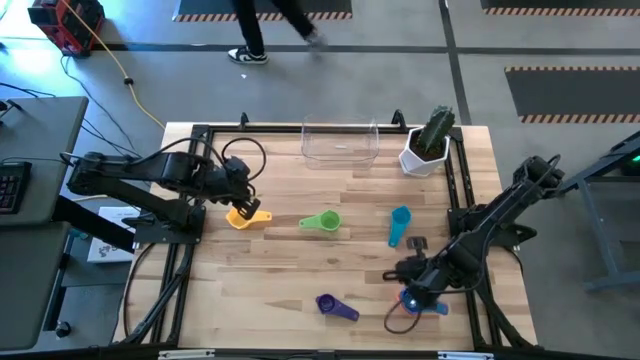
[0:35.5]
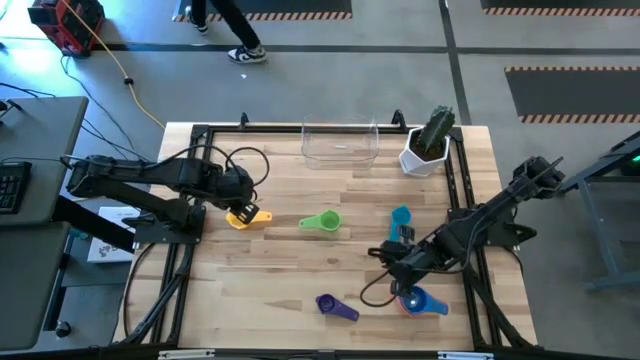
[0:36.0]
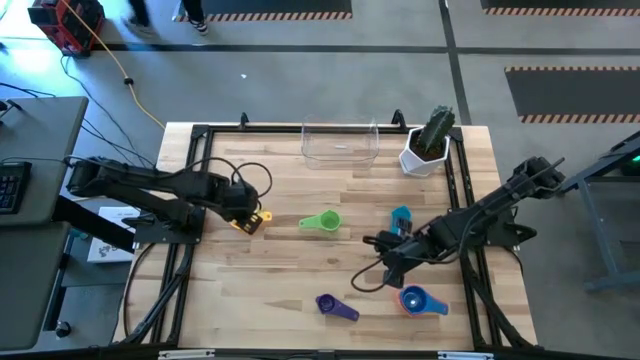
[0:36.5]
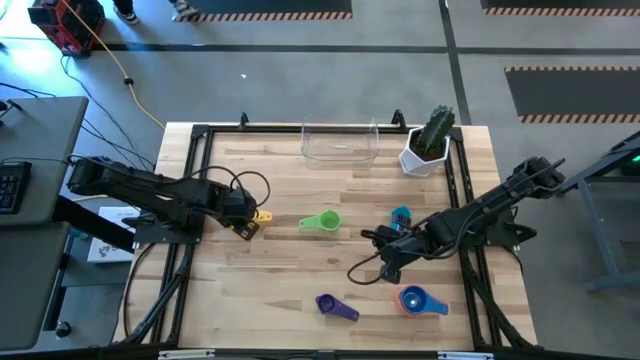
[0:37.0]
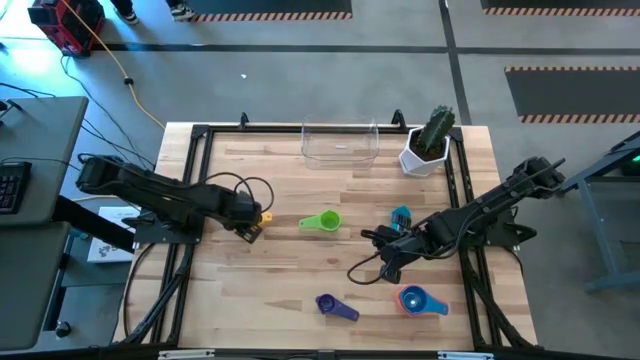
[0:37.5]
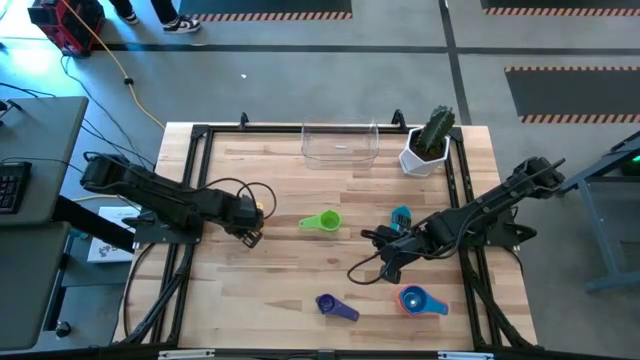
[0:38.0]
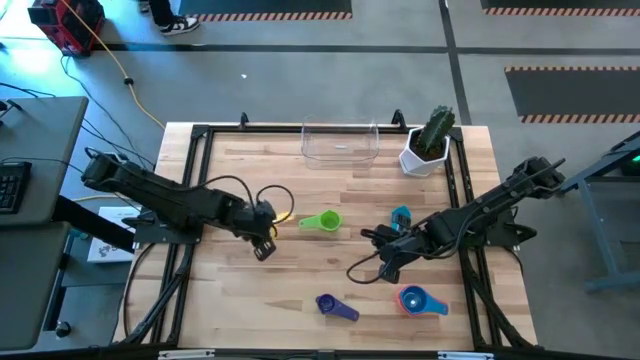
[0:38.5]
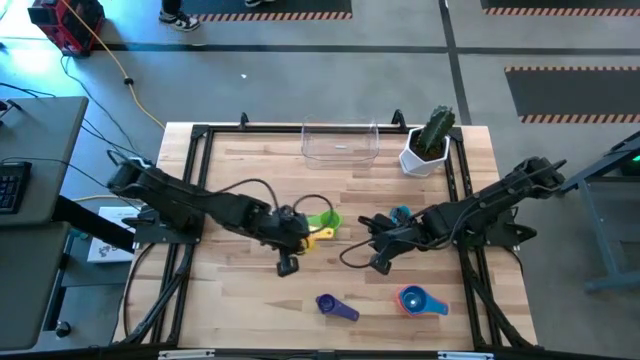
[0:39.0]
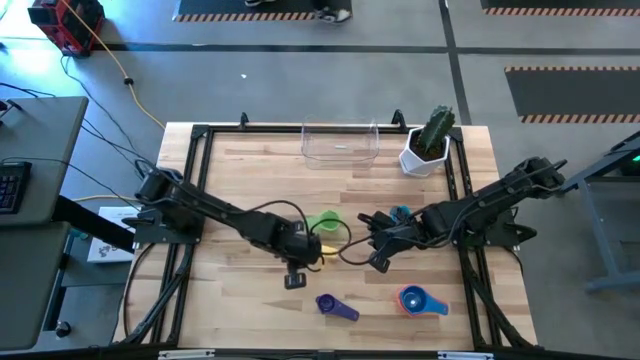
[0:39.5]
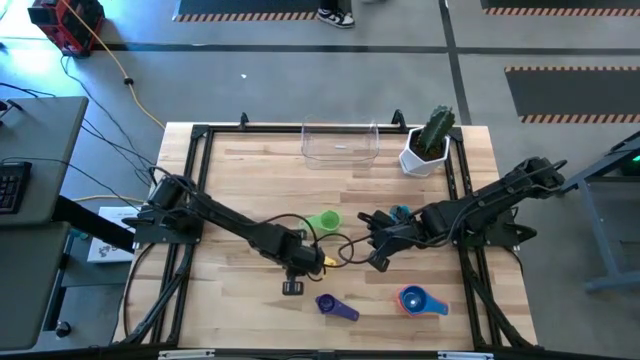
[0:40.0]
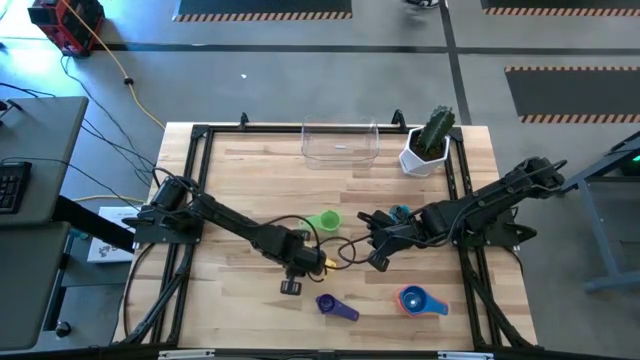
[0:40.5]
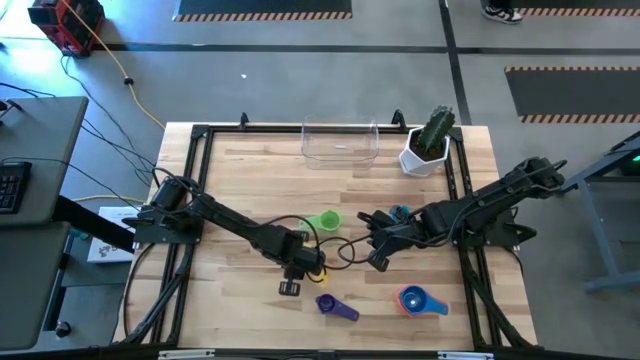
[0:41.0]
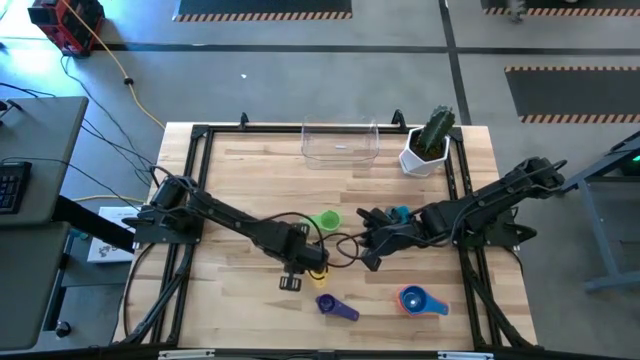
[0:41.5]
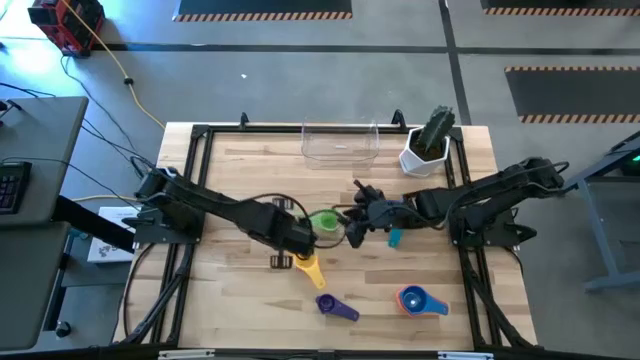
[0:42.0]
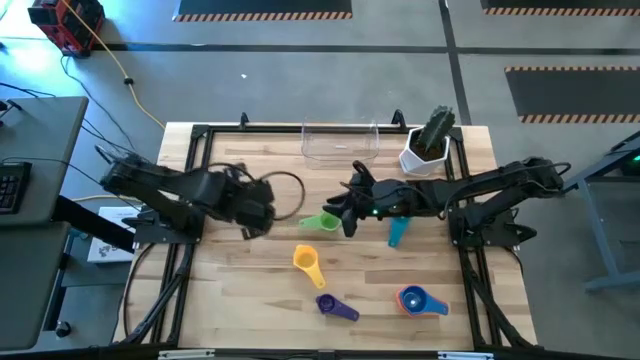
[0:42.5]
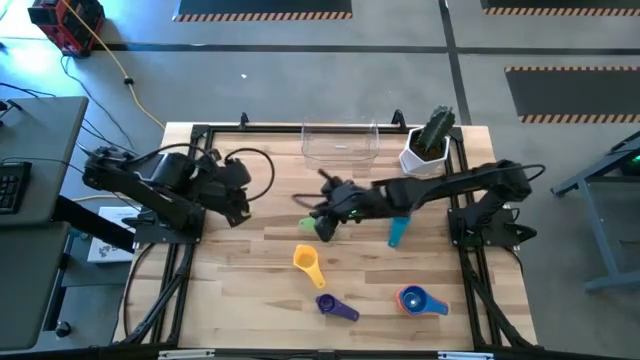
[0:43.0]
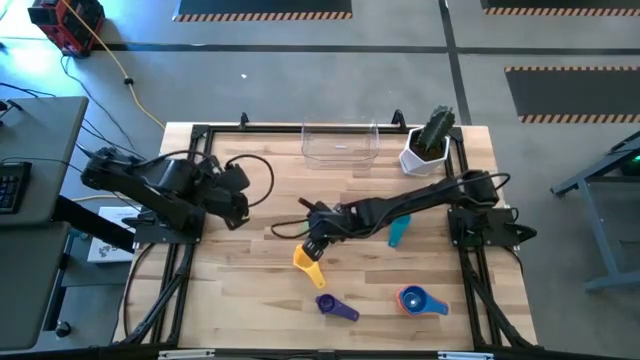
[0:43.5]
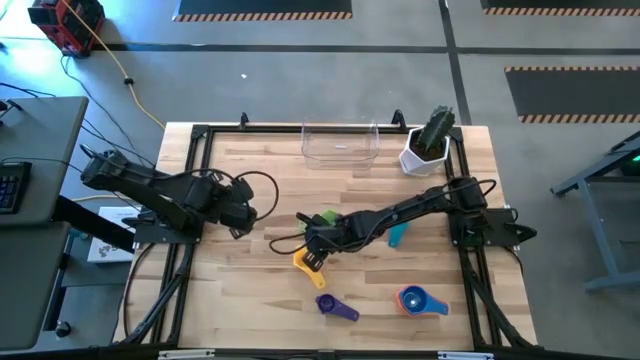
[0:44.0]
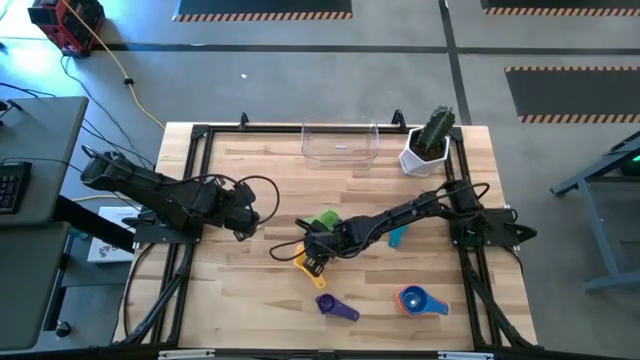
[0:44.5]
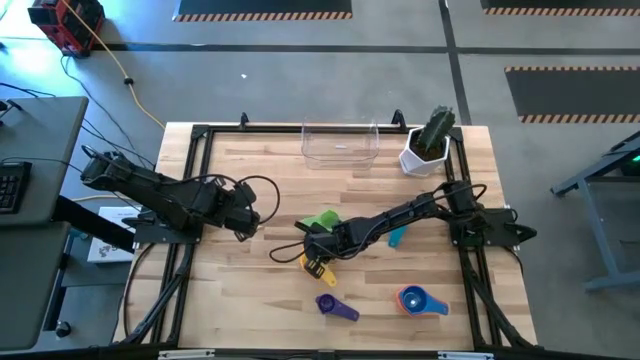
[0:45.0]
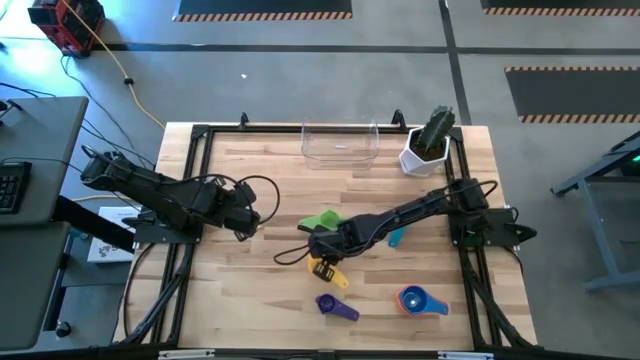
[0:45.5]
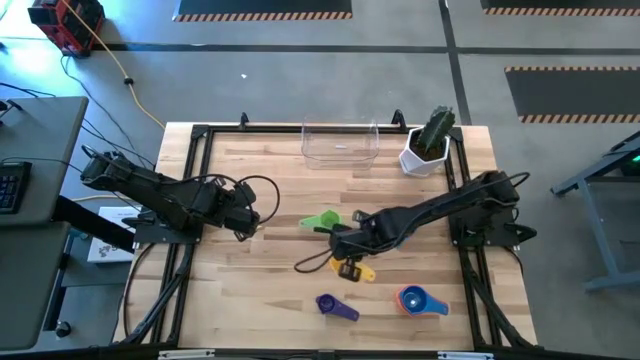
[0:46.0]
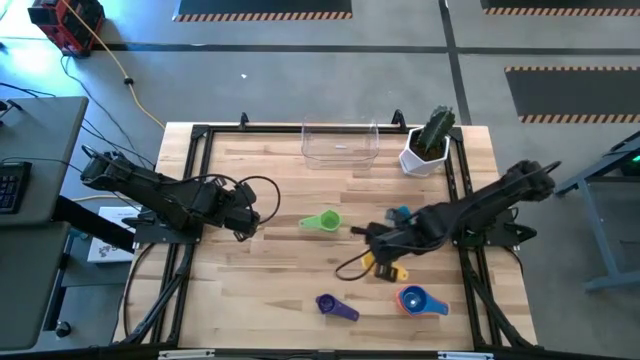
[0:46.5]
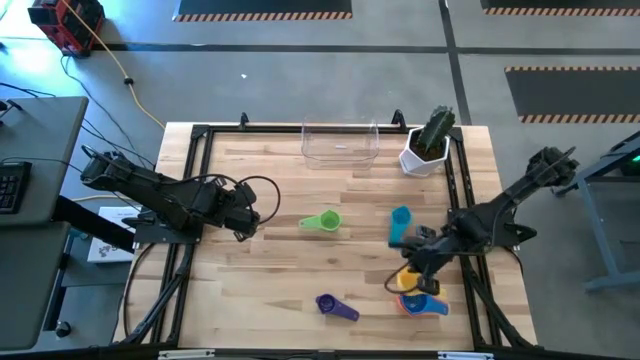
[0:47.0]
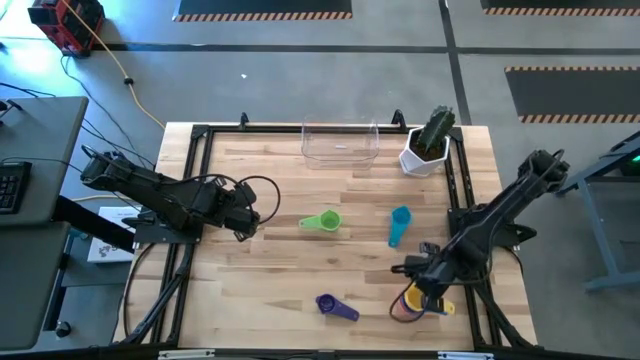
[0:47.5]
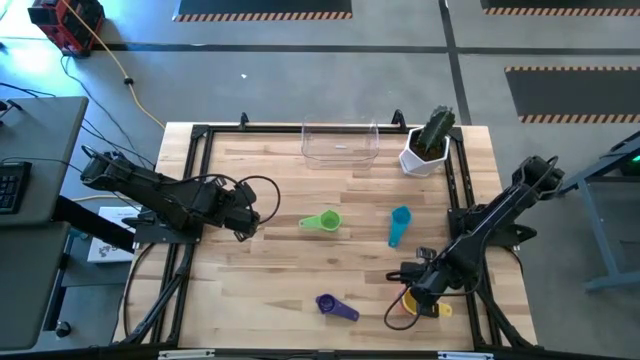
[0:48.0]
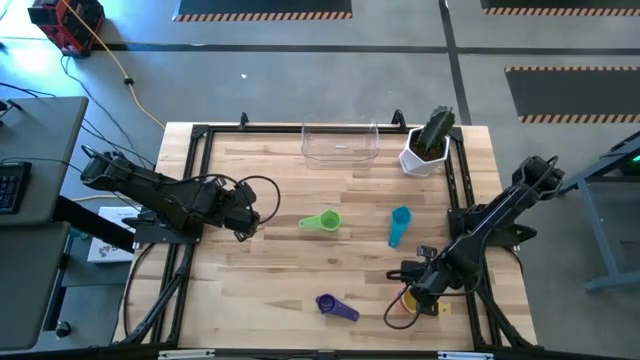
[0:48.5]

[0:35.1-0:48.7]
Task: Nest measuring cups in basket
Stack the yellow measuring cup on the top of the blue measuring cup

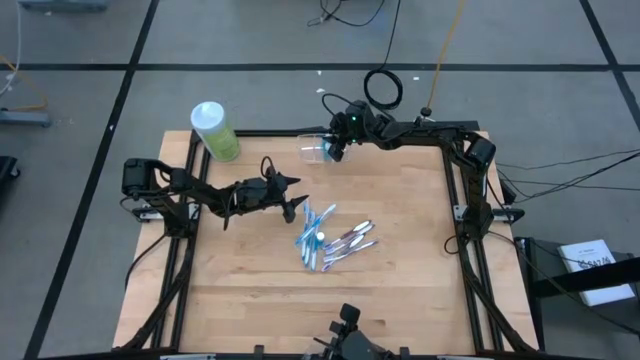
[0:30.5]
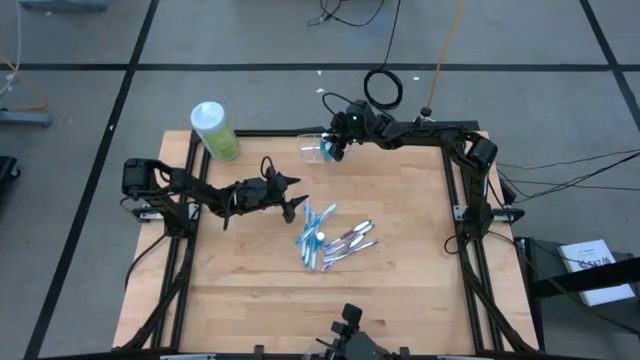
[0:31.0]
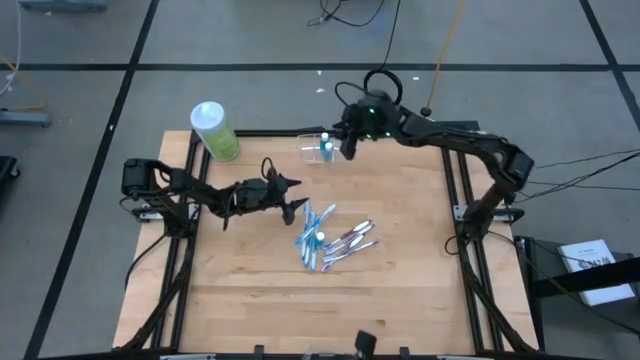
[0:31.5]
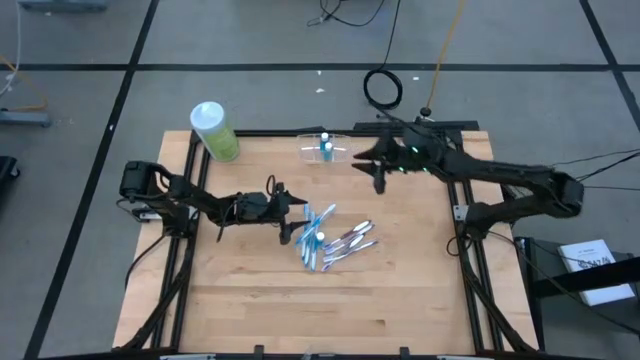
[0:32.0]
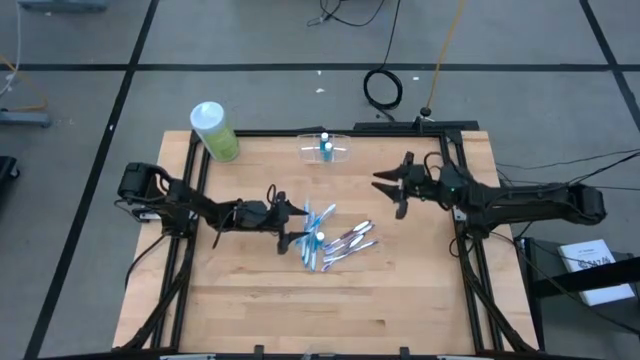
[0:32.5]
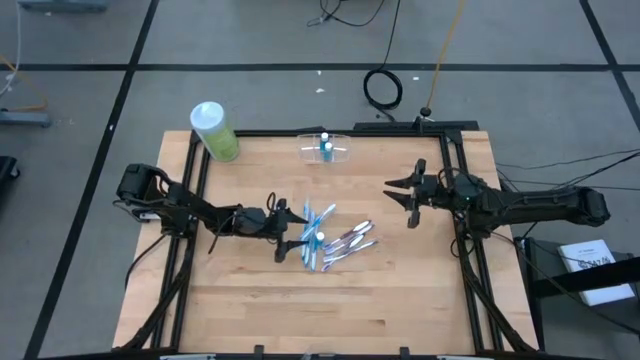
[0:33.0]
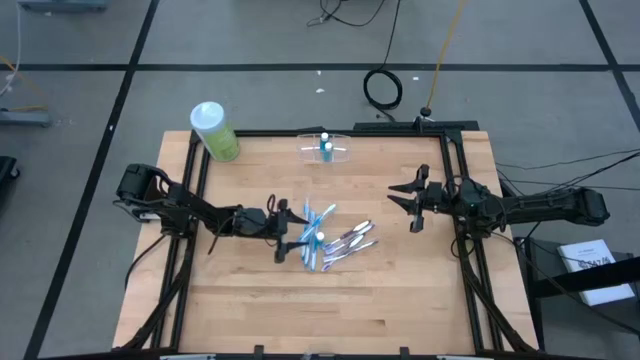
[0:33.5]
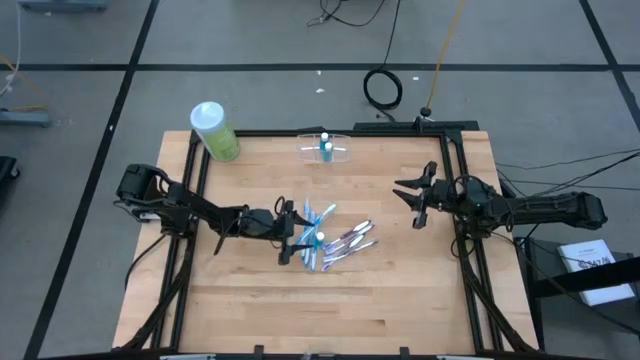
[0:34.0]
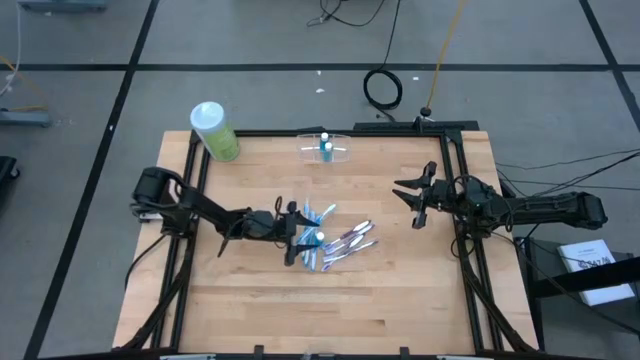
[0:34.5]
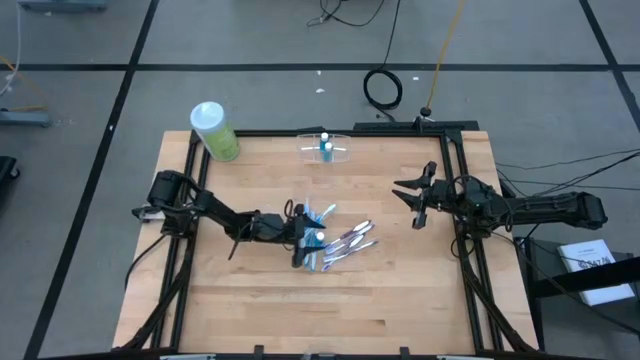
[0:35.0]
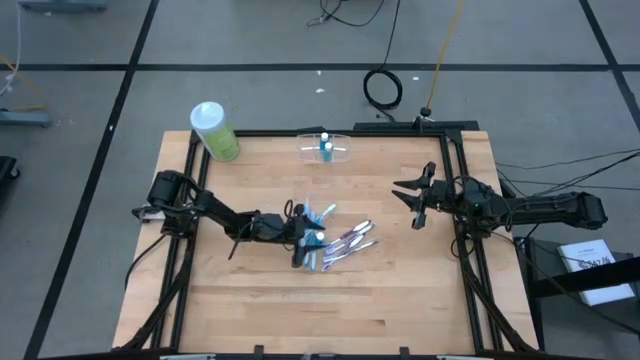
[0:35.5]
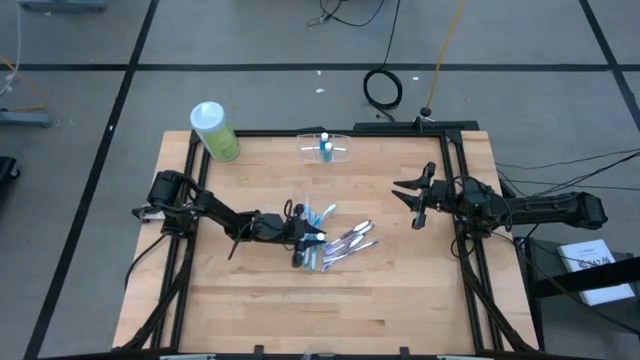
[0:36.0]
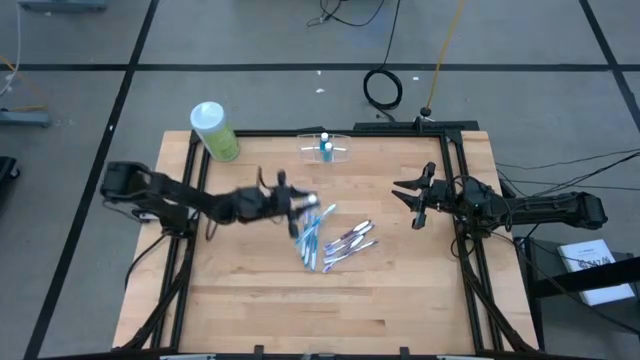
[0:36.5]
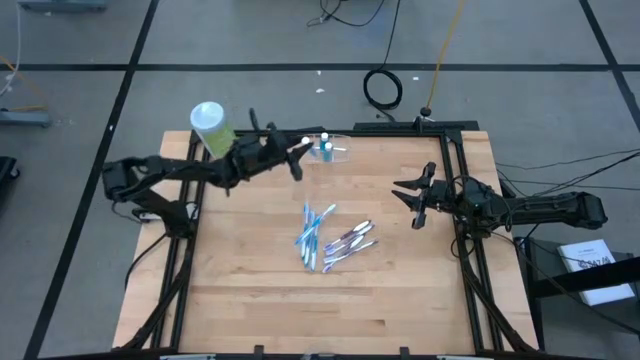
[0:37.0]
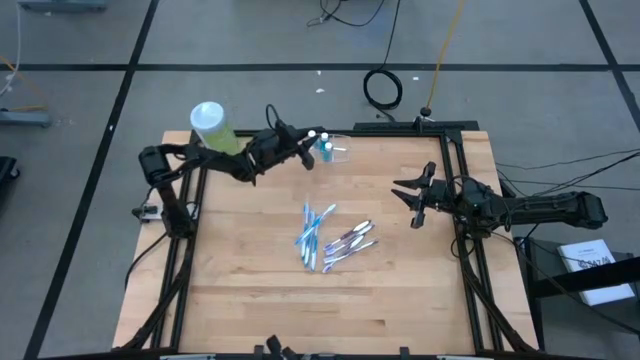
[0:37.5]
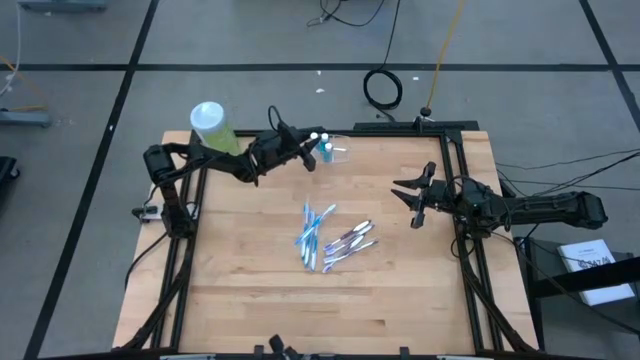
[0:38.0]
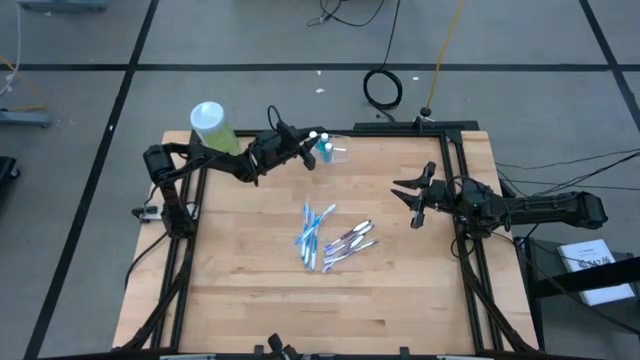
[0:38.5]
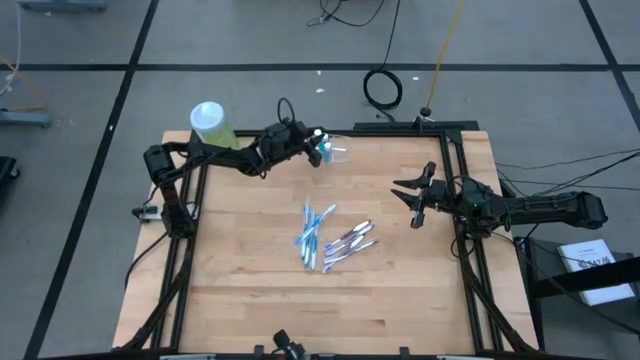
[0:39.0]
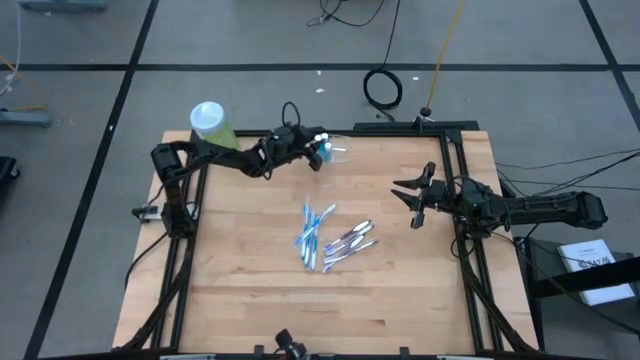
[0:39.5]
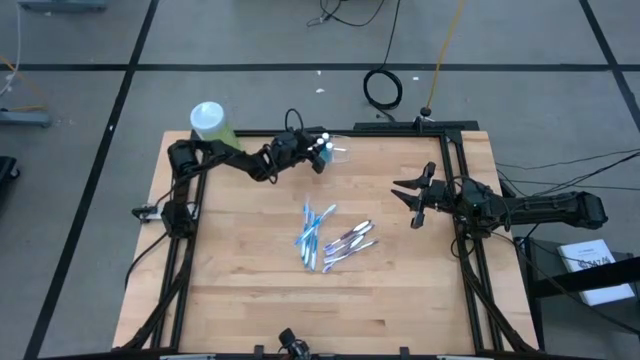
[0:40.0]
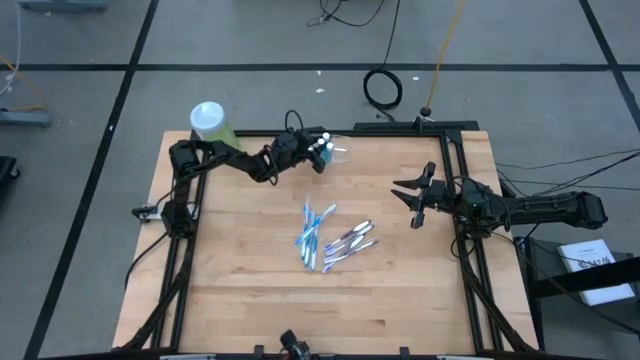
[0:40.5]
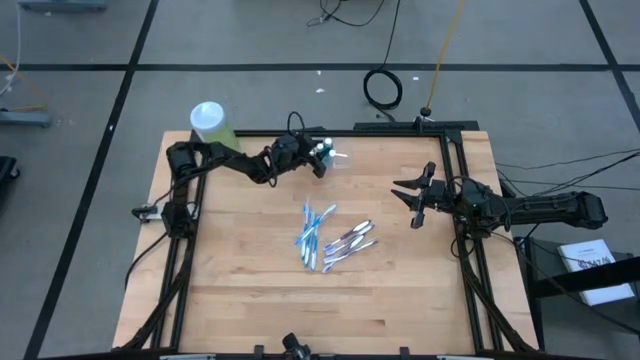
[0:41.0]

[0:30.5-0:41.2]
Task: Pick & Place toothbrushing station
Put the mouthwash into the transparent organizer
